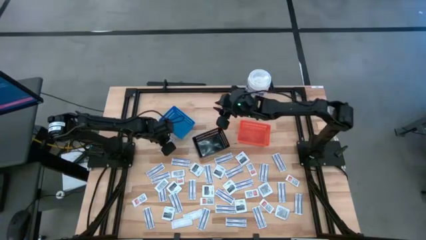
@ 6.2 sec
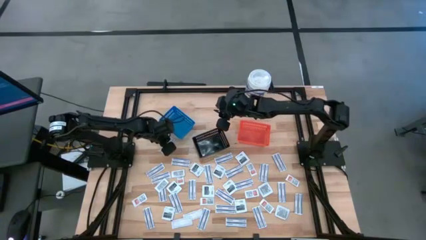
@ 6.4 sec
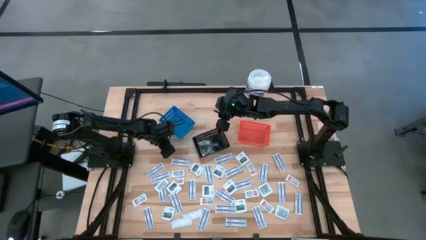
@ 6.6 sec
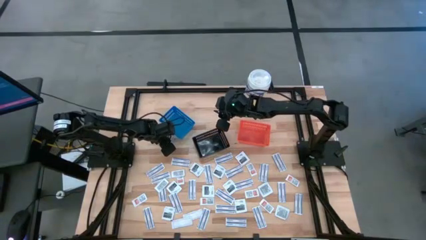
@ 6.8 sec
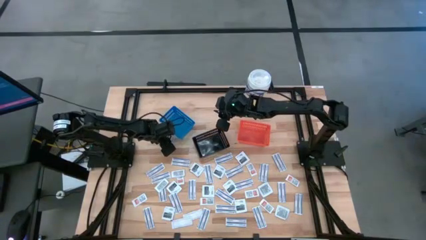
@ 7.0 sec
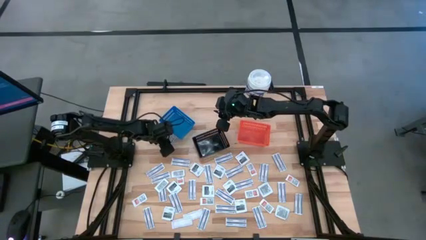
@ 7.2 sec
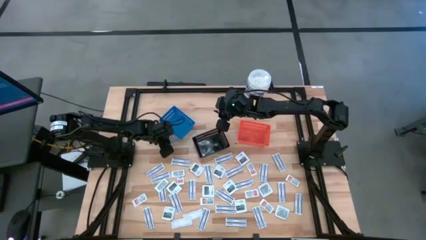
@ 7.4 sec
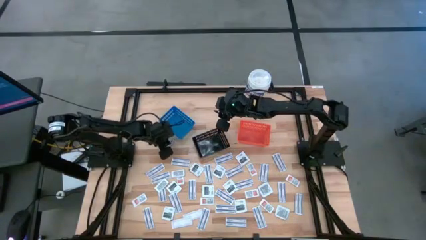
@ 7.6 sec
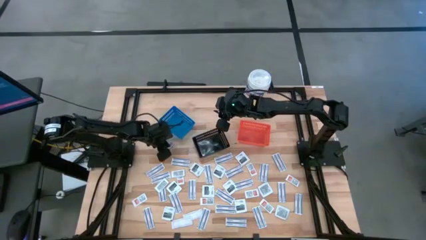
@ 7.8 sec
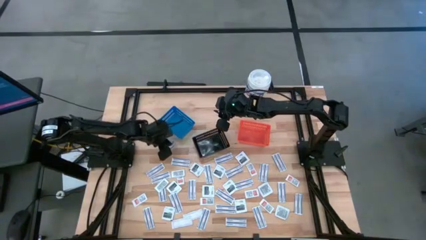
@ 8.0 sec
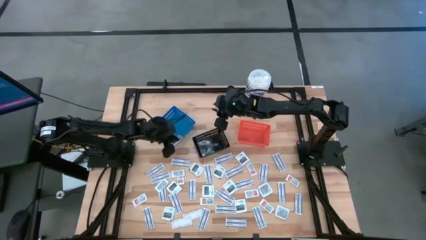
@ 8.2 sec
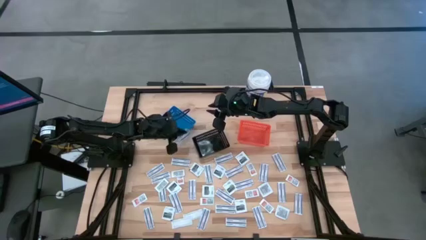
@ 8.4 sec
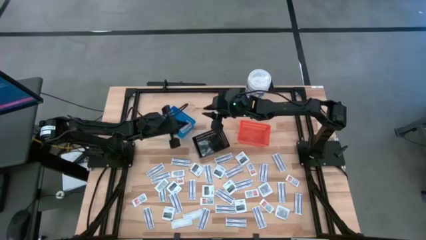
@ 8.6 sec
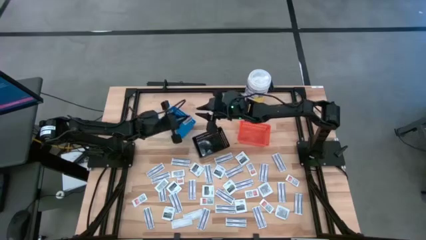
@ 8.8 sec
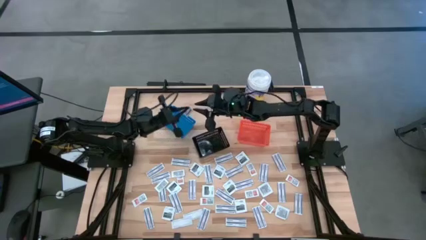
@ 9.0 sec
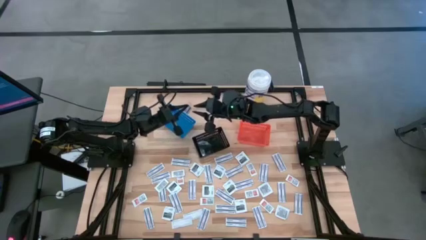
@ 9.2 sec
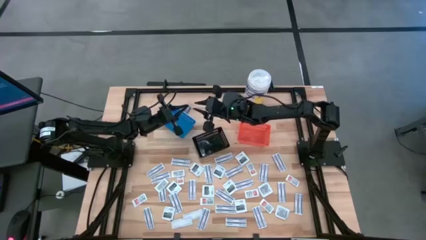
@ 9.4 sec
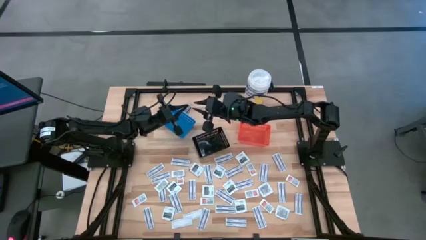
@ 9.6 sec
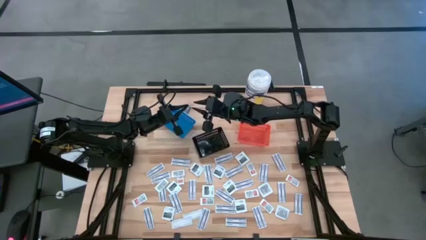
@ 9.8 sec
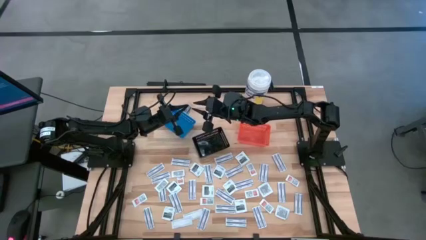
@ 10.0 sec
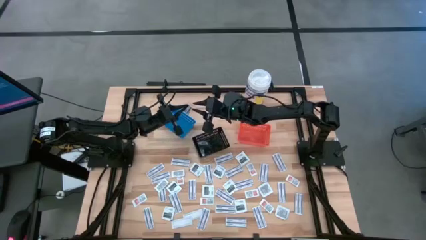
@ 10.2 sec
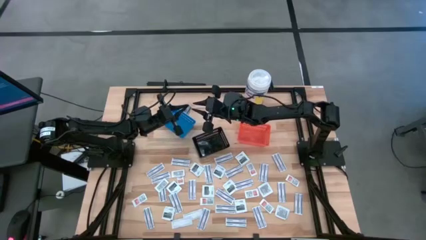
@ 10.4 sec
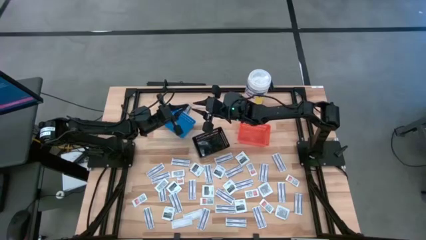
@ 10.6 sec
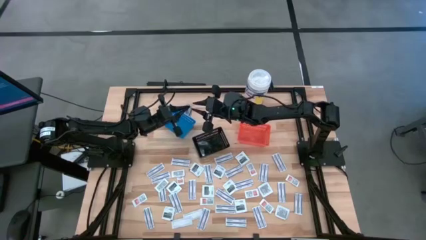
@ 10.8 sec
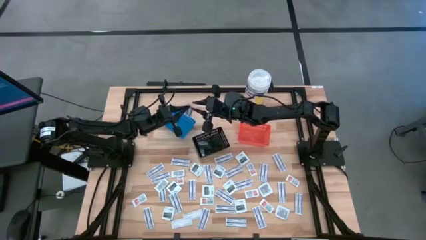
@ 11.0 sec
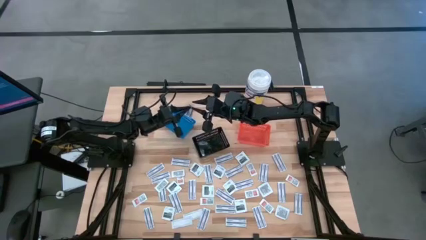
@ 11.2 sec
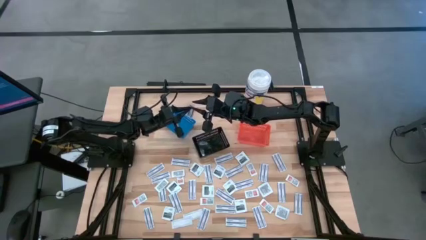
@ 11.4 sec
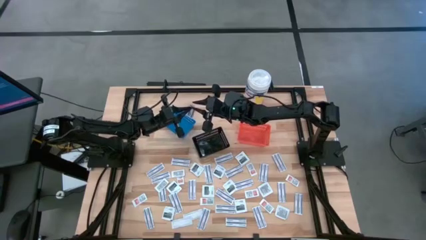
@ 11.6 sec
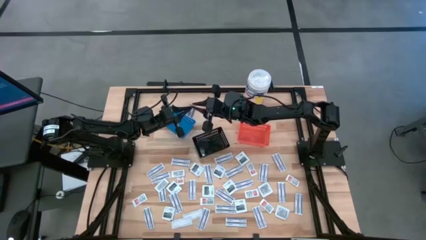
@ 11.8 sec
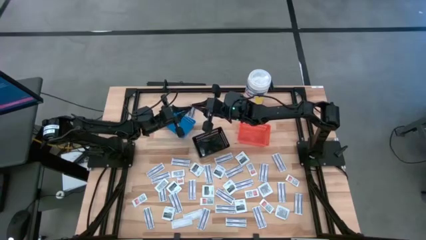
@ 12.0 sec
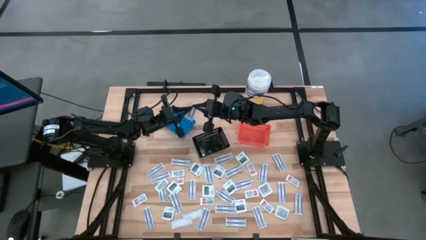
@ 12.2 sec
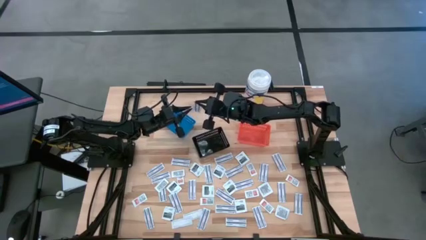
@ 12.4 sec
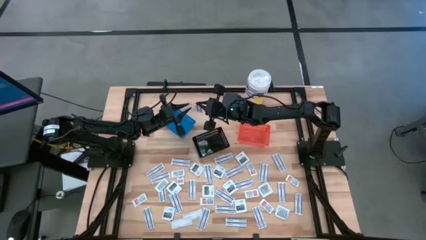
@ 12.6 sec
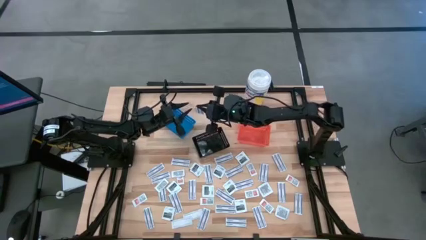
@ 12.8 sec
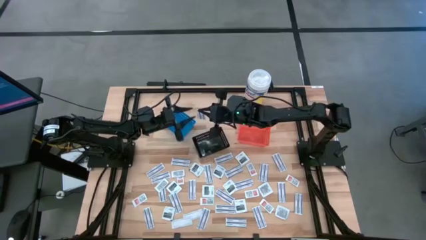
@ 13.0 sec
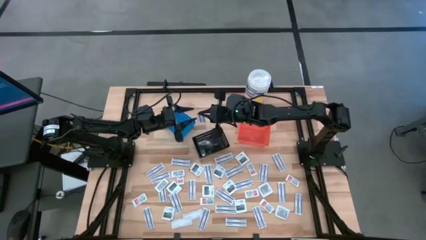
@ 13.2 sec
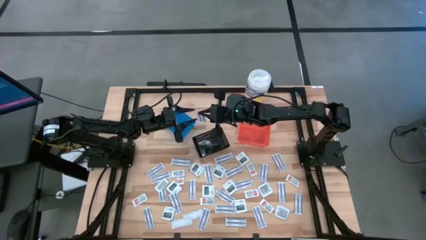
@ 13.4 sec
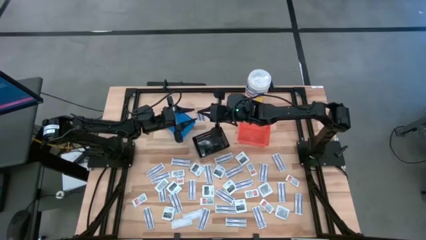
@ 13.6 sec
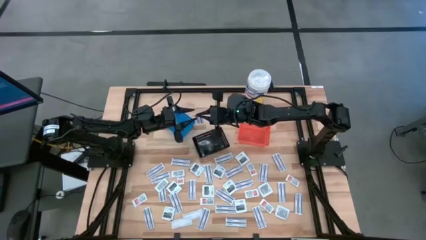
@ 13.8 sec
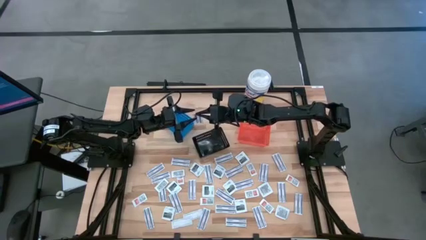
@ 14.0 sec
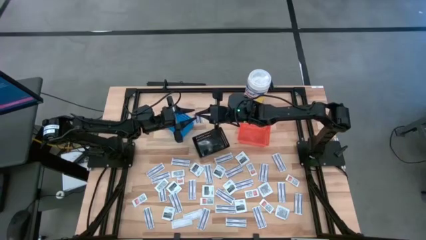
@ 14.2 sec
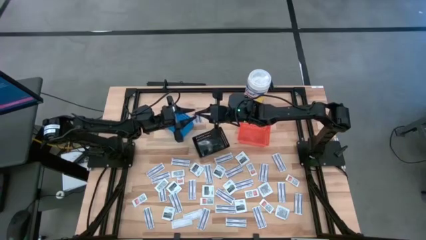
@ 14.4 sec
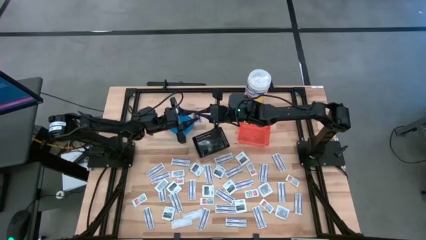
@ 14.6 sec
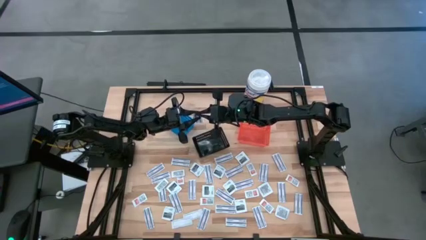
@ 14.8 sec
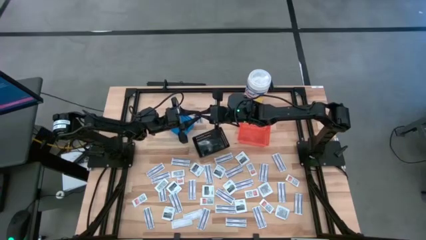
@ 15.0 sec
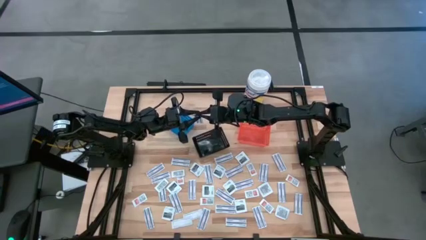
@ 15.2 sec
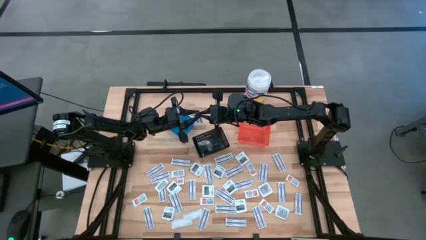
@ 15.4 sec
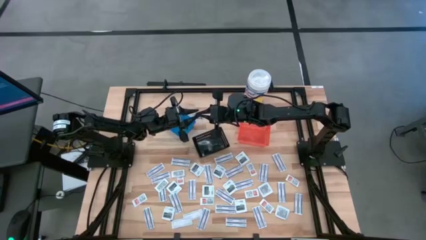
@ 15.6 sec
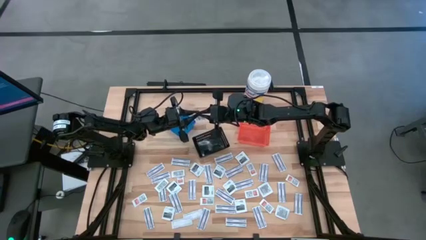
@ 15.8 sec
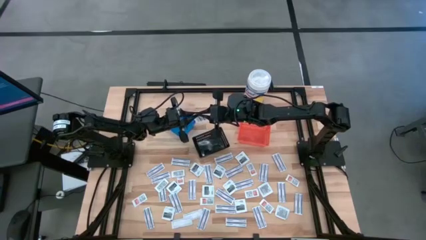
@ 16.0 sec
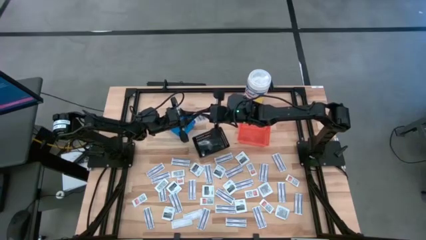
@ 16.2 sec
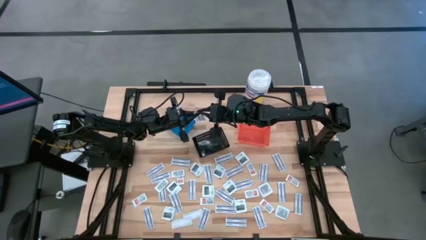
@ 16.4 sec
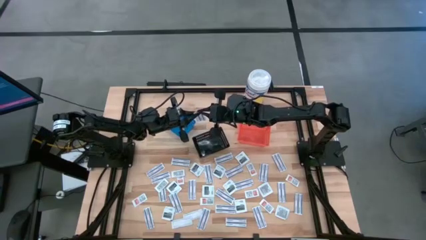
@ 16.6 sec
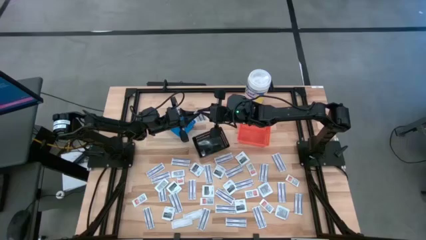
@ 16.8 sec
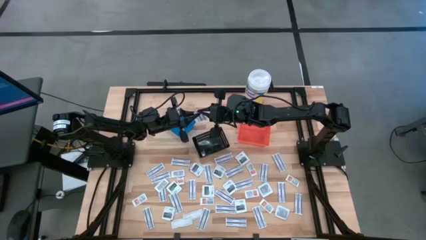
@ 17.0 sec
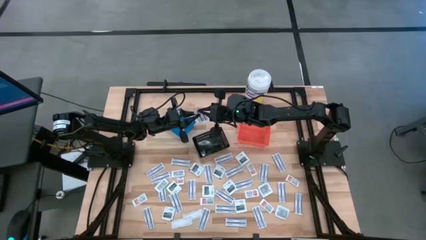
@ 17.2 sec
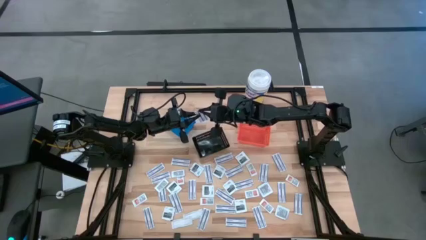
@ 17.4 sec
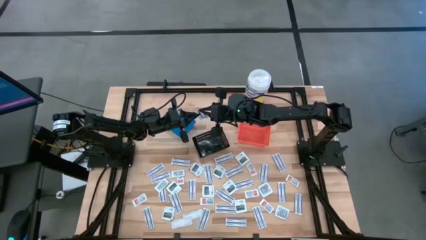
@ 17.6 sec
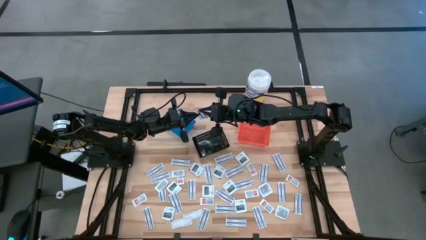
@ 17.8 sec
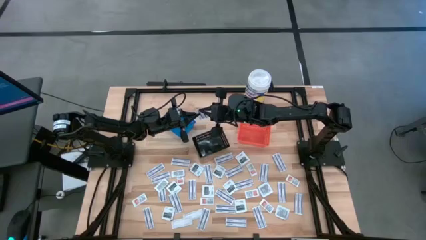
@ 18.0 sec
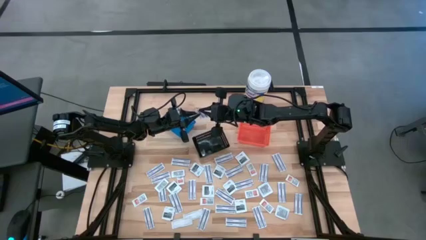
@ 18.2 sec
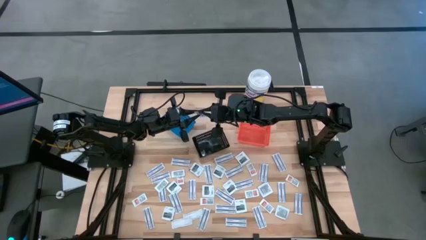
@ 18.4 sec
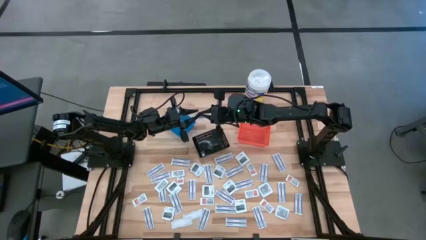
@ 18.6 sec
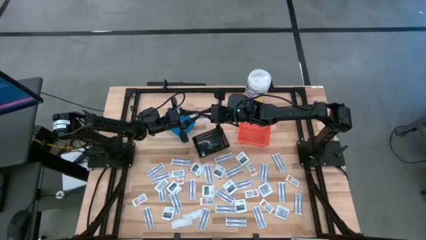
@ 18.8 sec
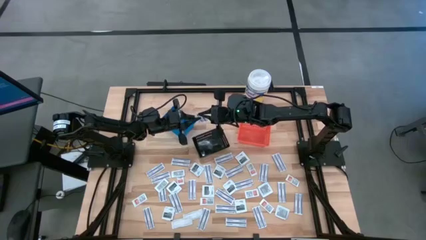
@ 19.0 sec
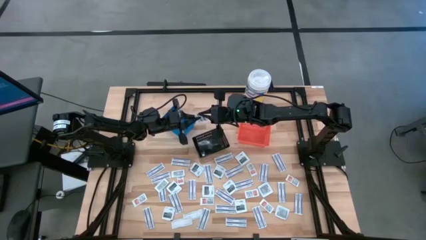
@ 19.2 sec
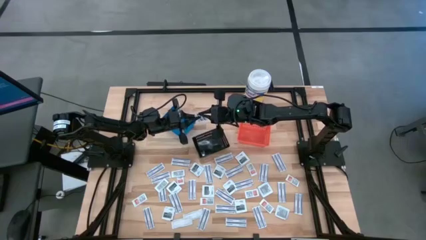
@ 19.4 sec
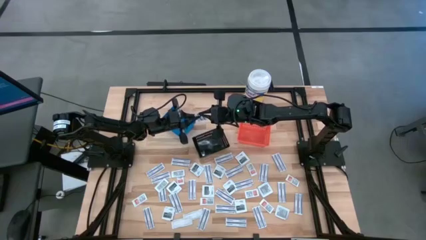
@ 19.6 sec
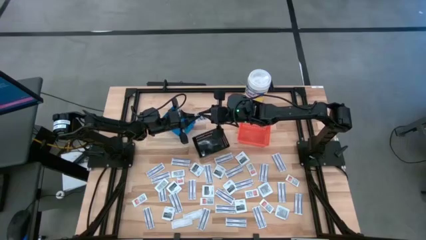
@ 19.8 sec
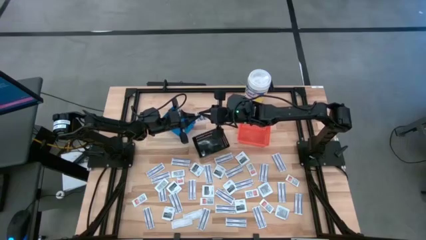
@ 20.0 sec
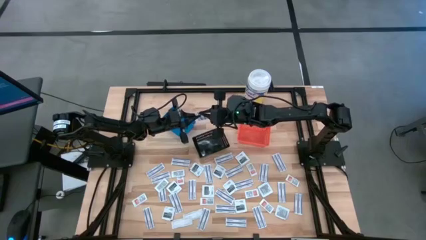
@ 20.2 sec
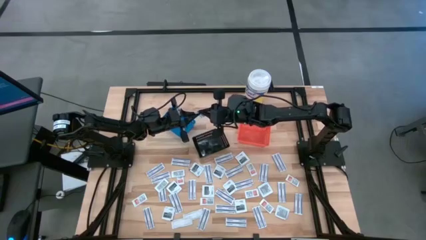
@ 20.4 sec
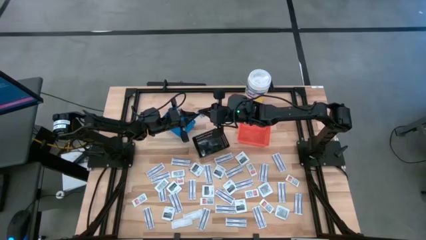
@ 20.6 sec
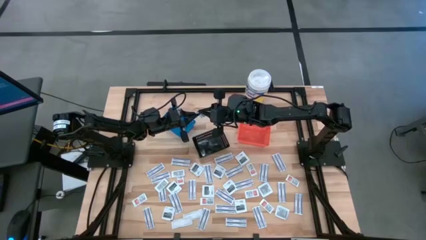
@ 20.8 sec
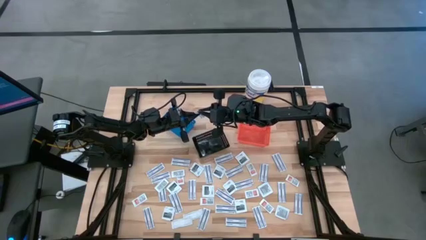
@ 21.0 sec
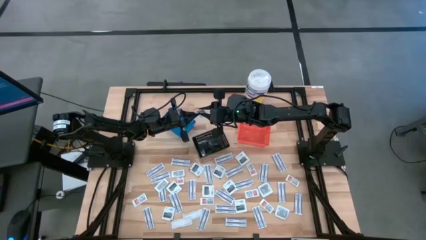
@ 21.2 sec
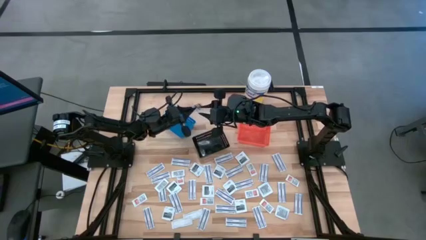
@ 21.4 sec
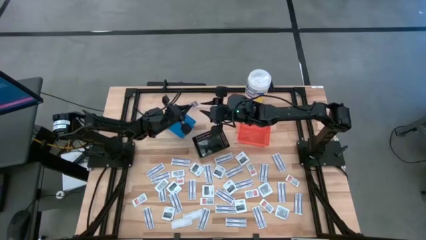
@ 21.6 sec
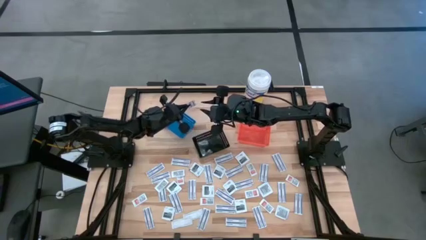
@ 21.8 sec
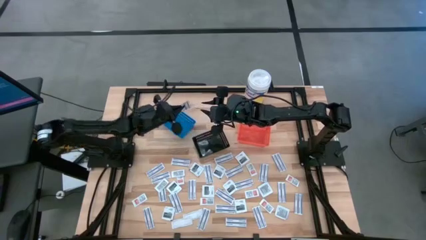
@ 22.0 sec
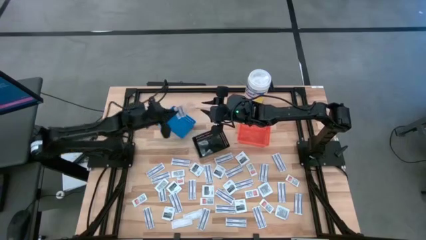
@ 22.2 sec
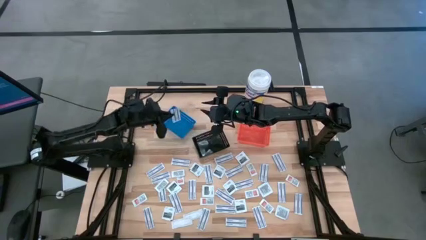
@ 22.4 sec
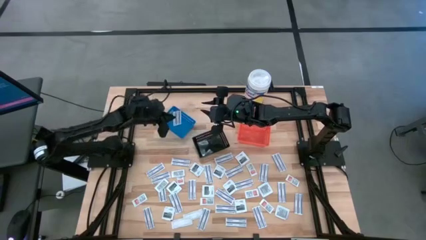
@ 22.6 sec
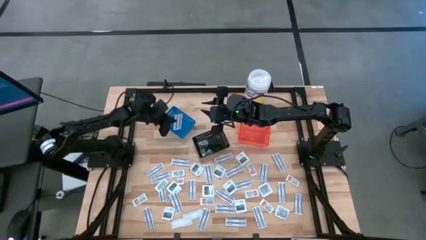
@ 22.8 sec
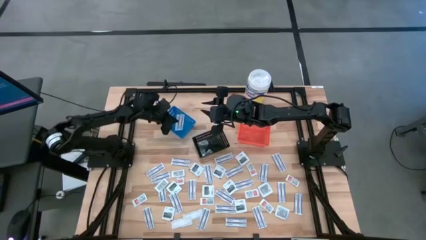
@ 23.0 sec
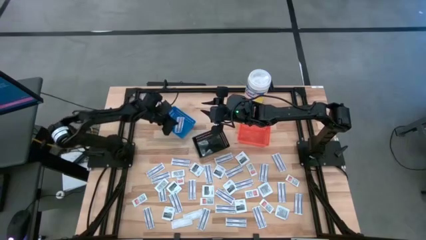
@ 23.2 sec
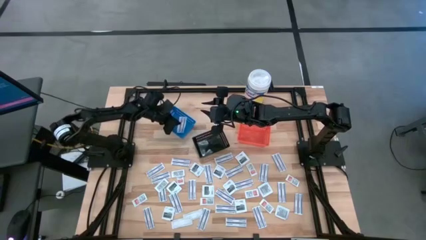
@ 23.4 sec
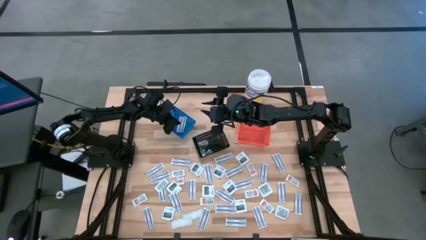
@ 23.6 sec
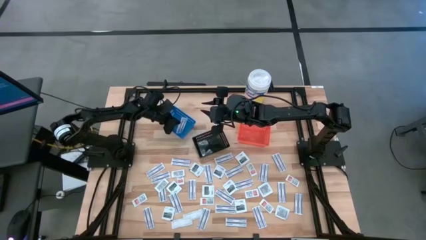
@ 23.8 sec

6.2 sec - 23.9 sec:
Task: Pick & Place First Aid Supplies
Put the bandage into the blue container
